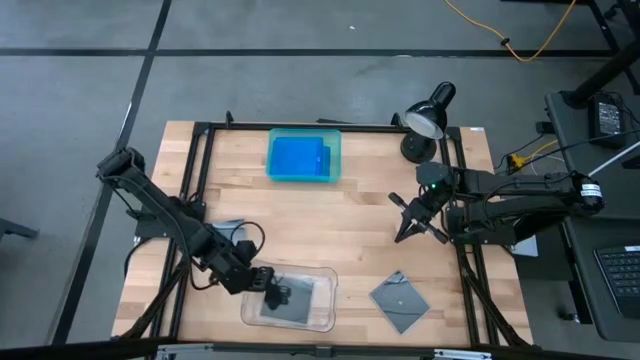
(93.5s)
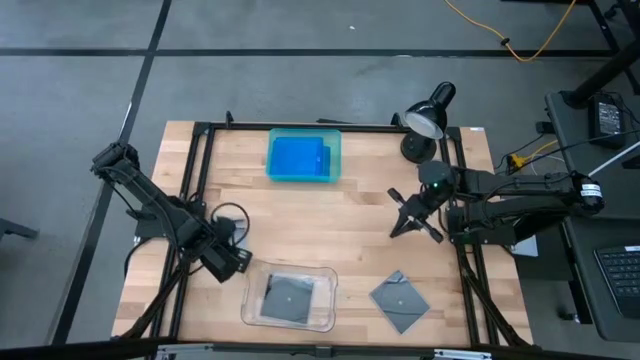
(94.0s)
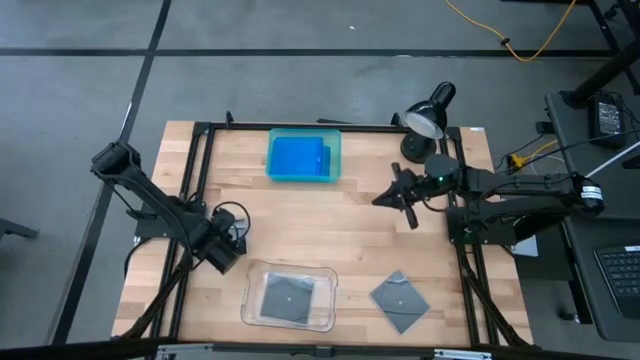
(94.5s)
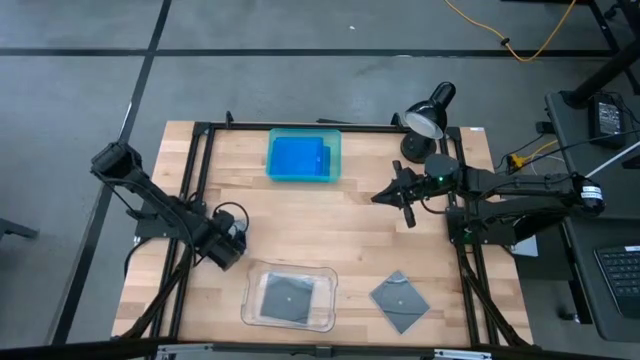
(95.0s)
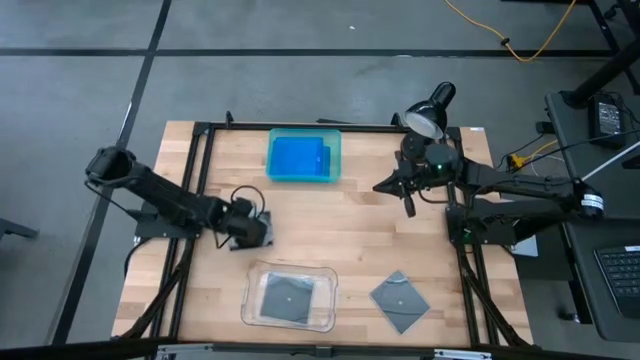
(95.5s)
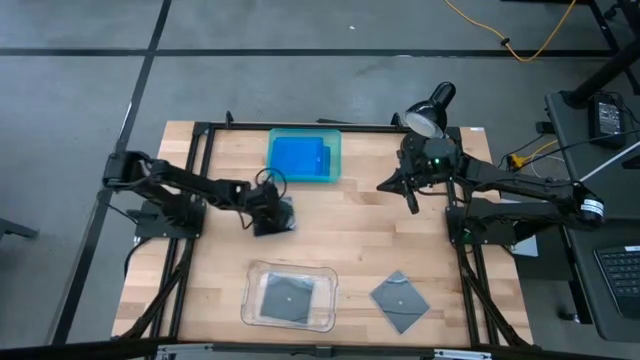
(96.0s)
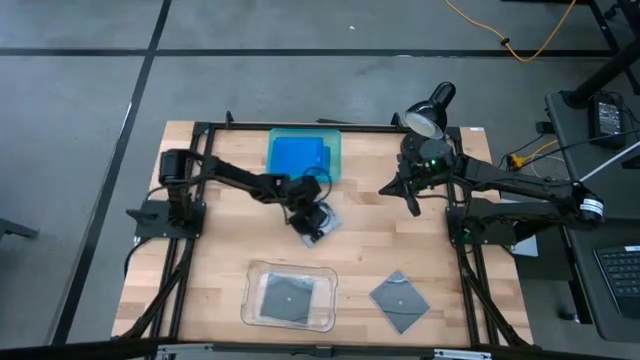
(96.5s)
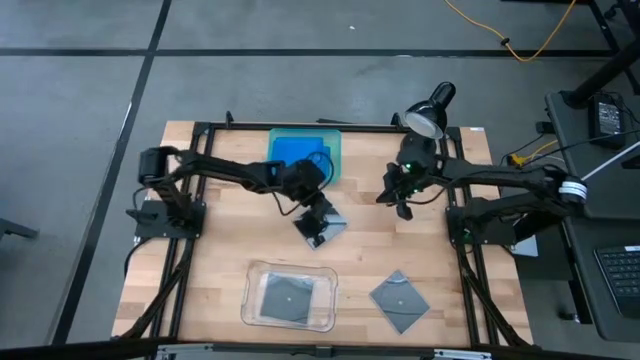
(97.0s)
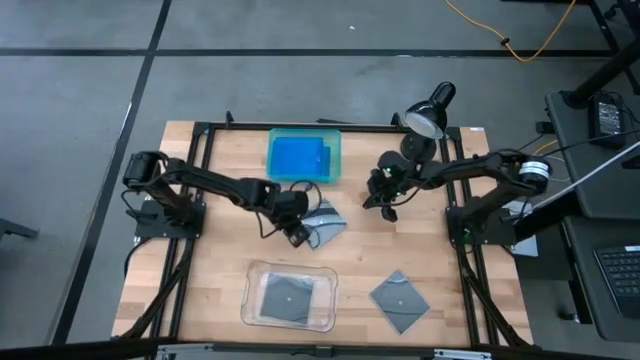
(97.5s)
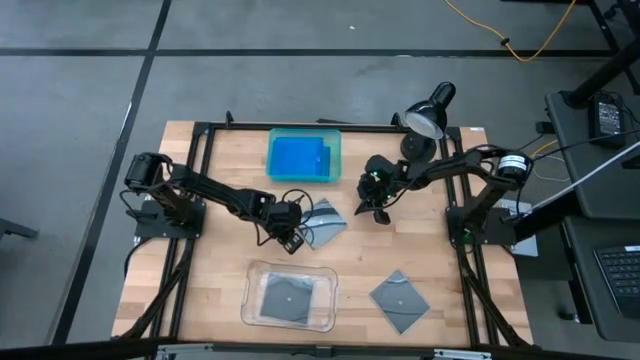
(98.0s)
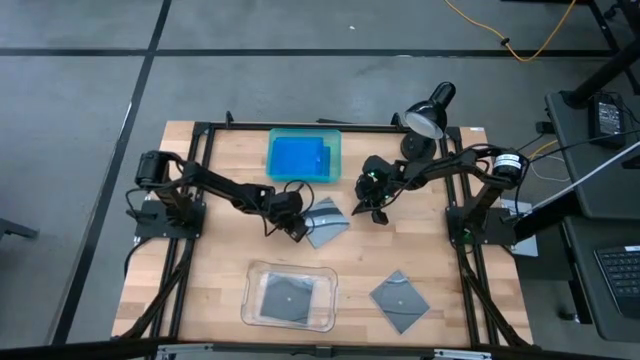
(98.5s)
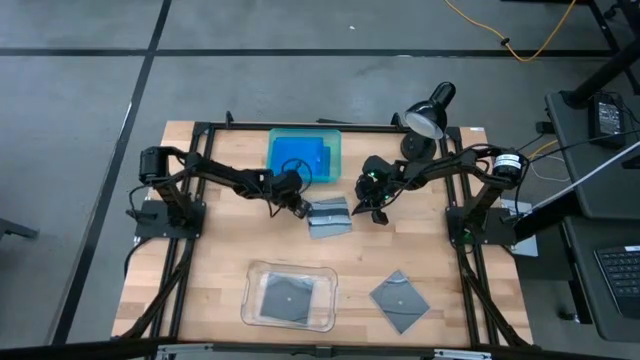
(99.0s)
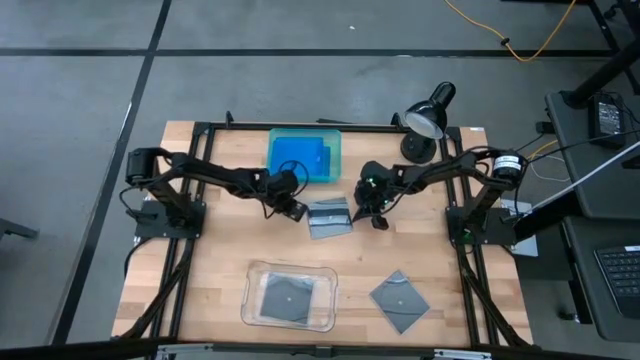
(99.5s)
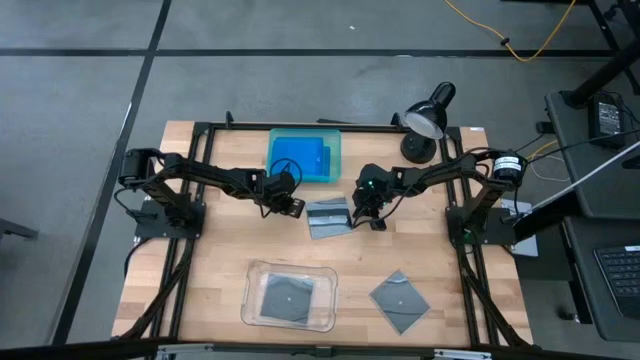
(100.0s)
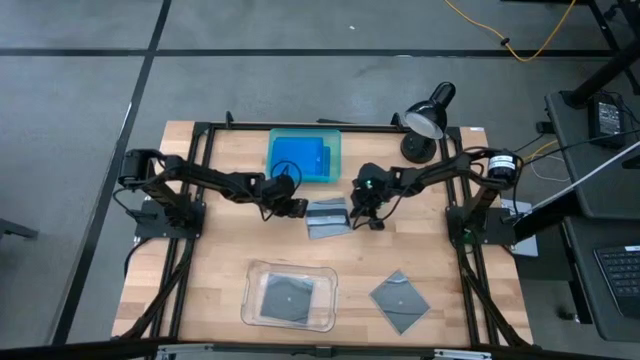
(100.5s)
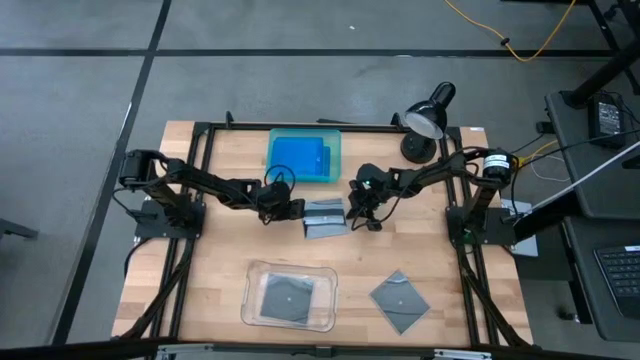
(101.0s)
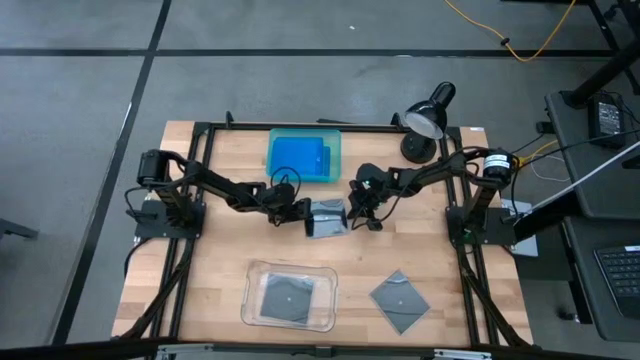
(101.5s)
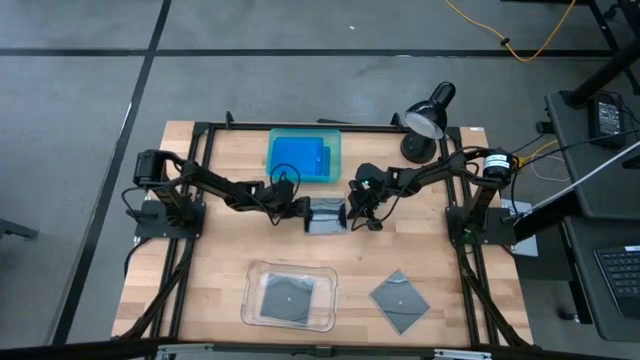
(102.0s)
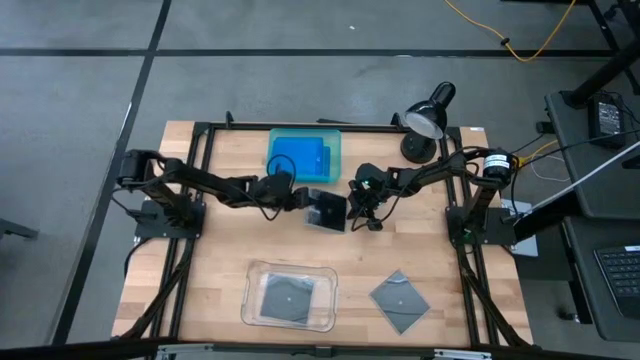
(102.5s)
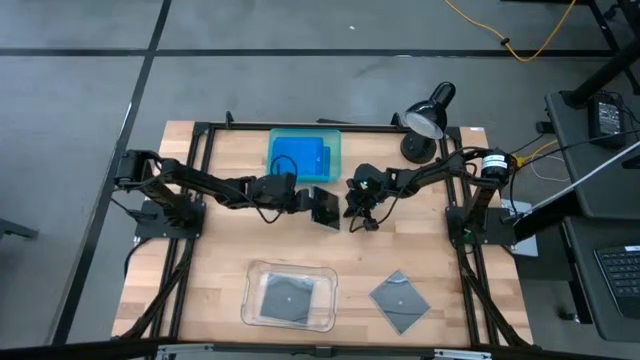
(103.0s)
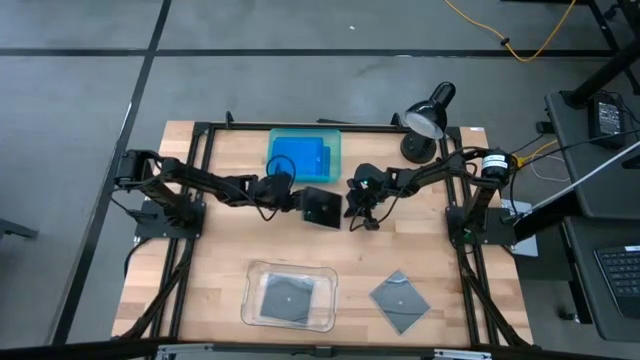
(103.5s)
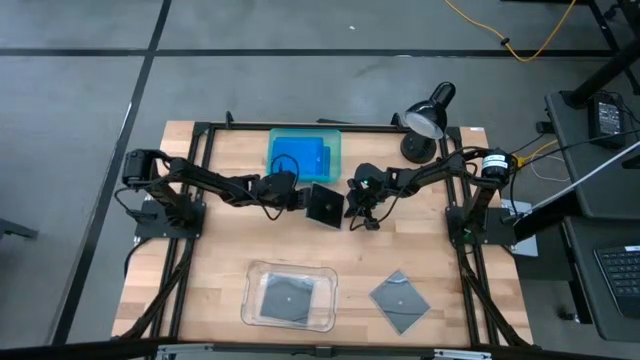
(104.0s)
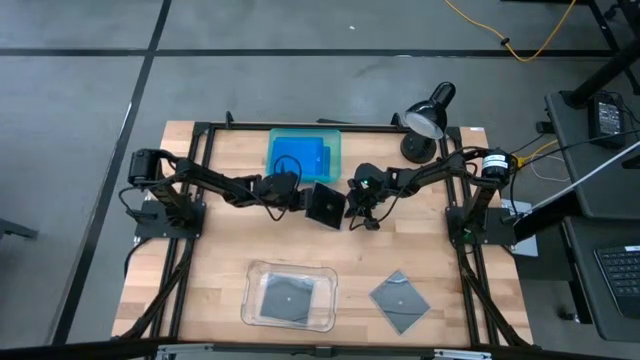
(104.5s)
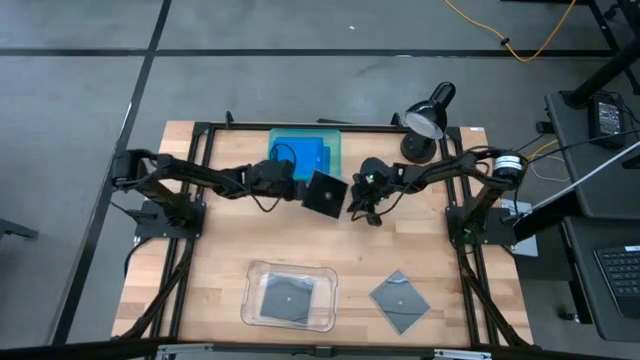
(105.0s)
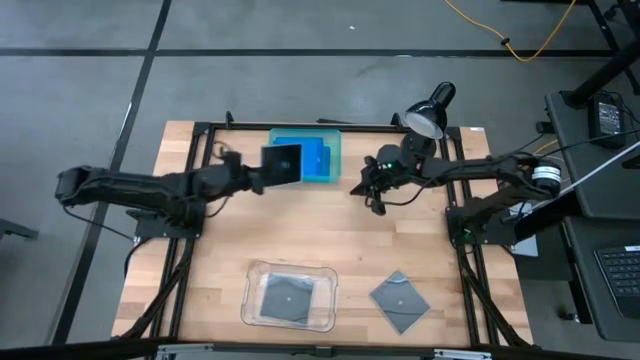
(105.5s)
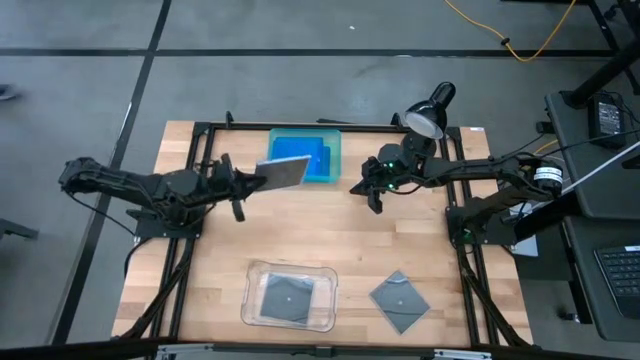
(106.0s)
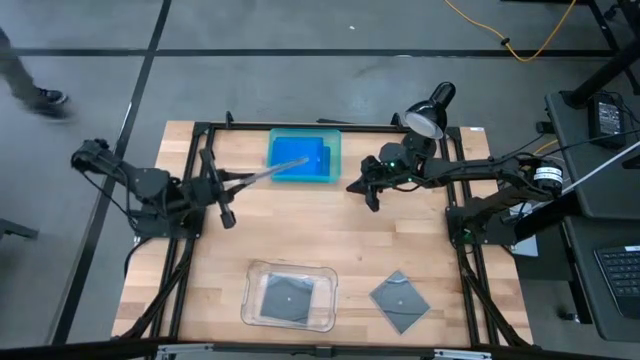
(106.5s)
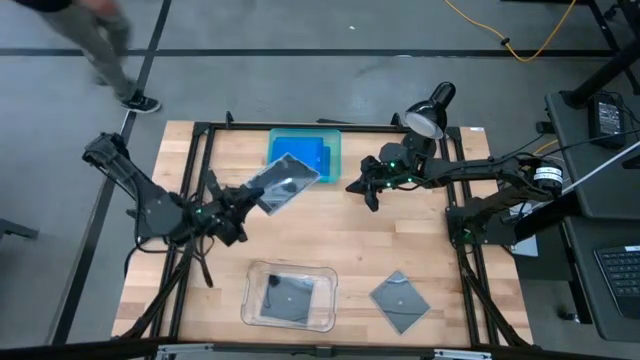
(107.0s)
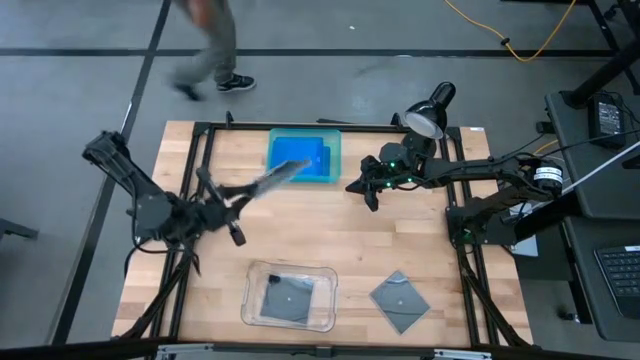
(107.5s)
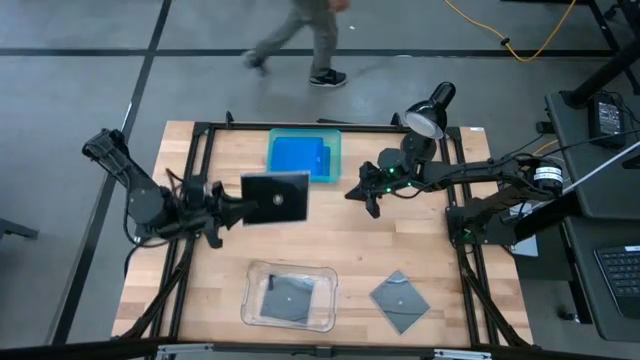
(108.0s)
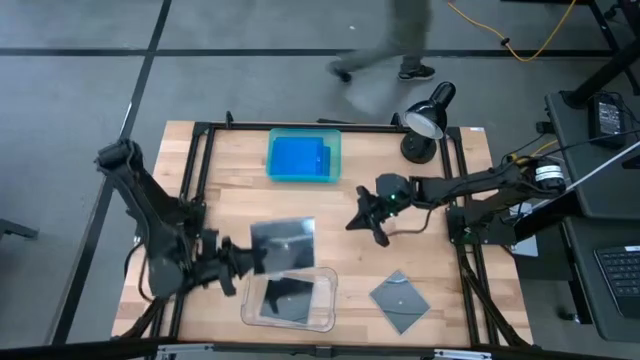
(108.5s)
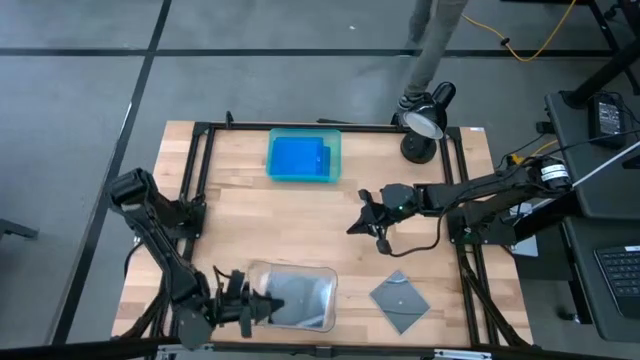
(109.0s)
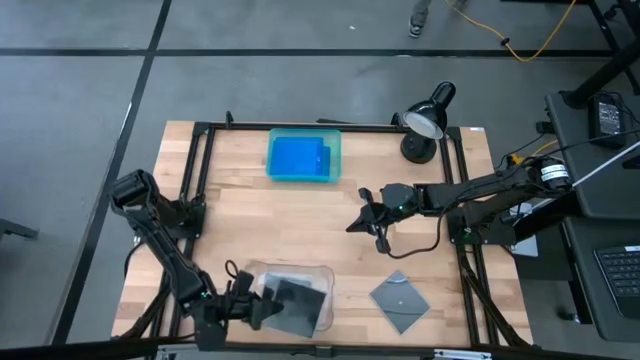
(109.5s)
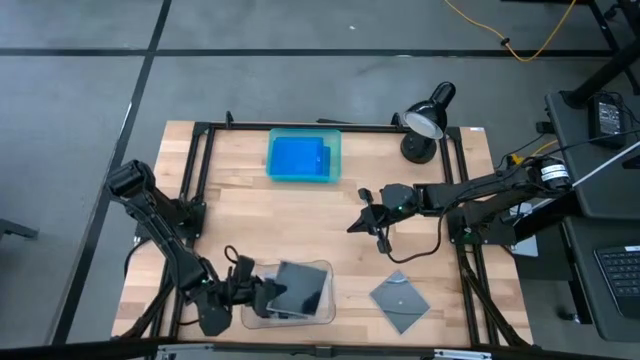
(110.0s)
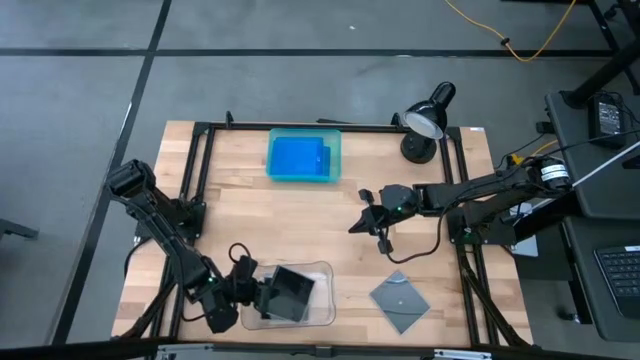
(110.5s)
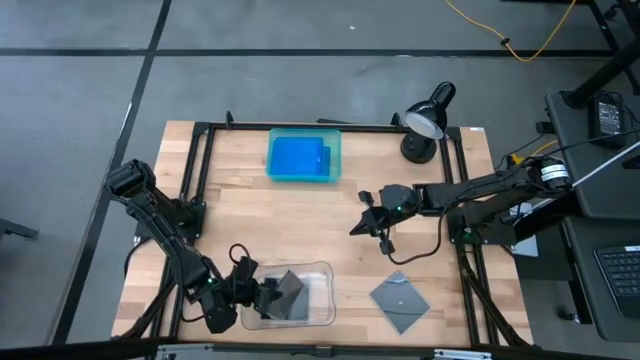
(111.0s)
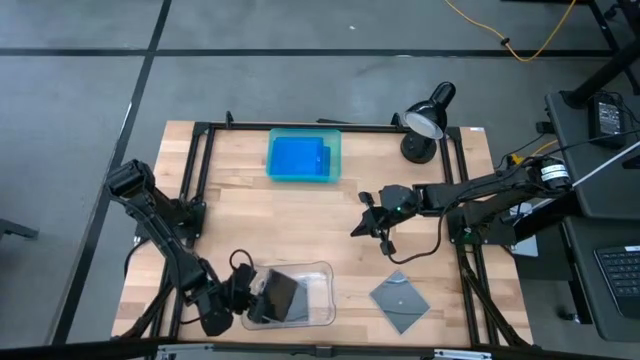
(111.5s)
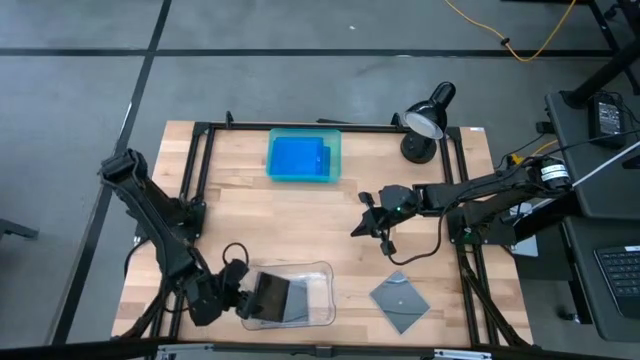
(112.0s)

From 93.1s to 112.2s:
Task: Pick & place jewel cases by type
Put the left black cd case into the transparent bin

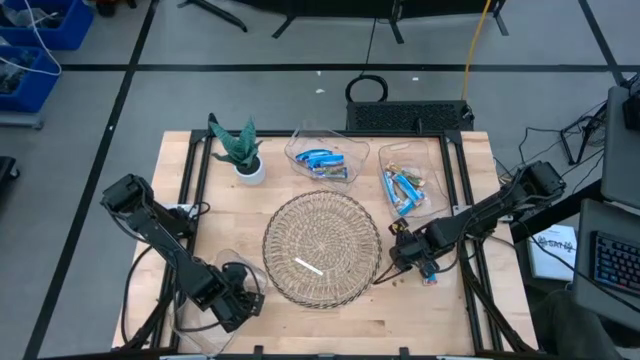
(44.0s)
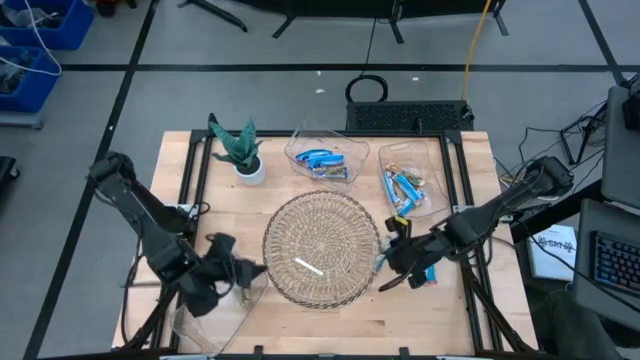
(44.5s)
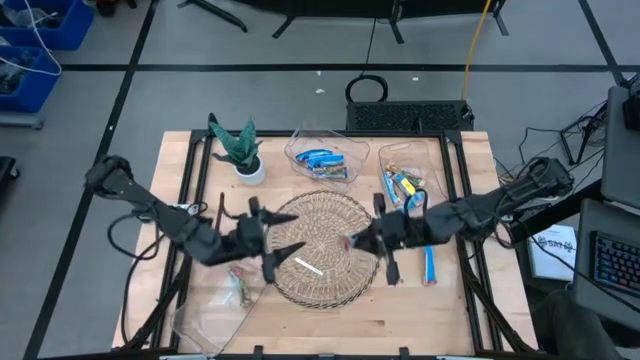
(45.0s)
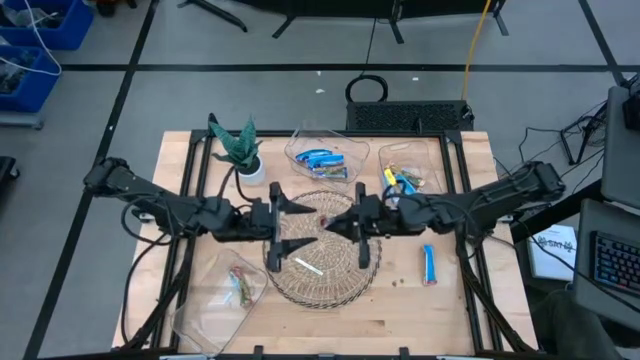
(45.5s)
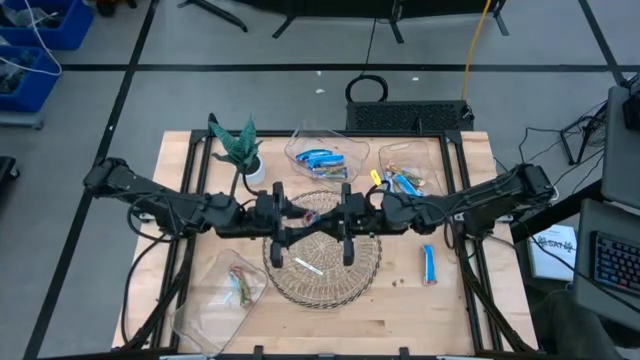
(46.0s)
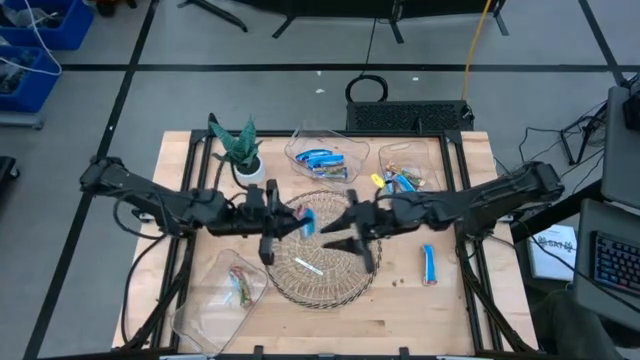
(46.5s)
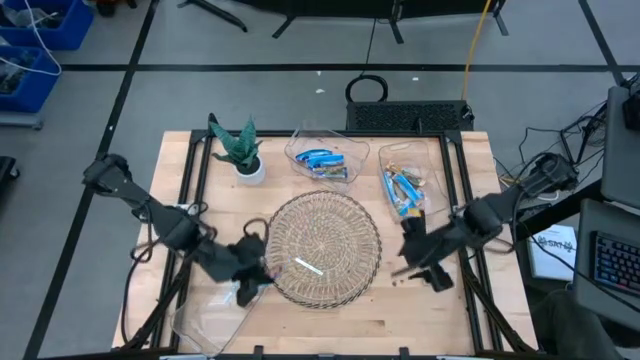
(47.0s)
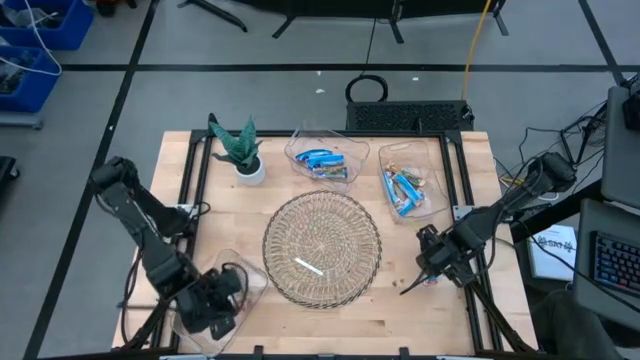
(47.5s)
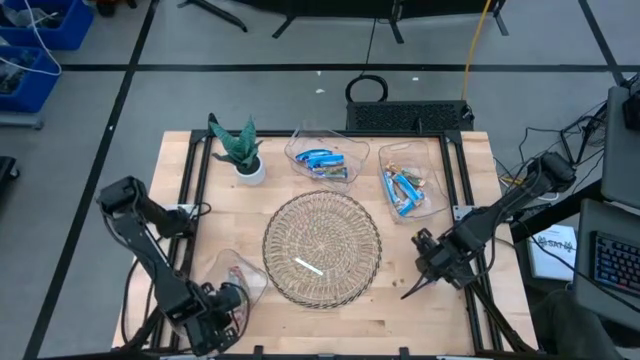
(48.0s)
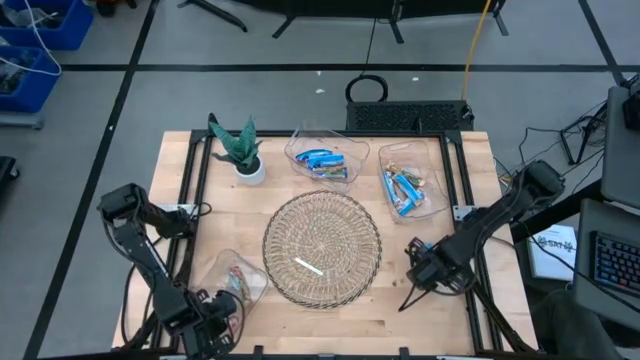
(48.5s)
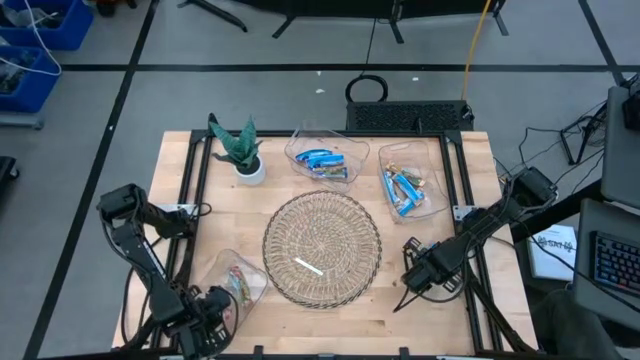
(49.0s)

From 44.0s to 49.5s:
Task: Pick and place Granola Bars by type
Put the left red granola bar into the bottom transparent bin
